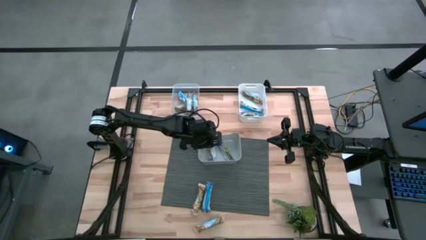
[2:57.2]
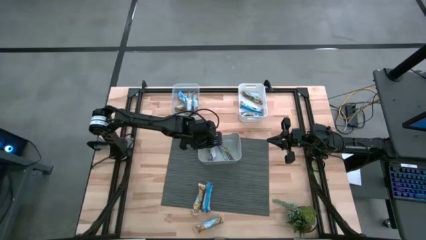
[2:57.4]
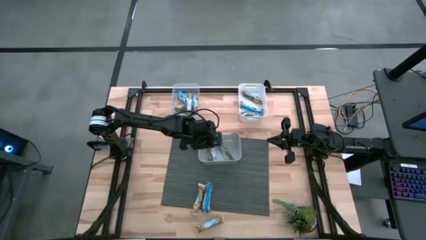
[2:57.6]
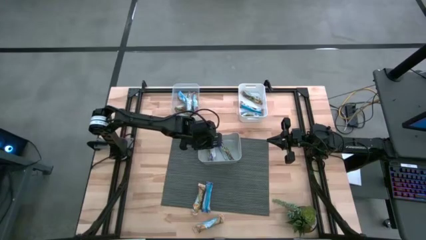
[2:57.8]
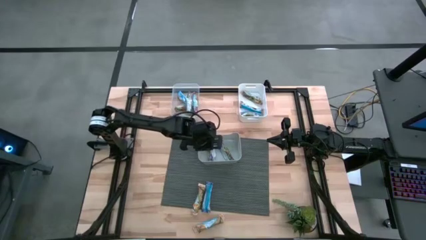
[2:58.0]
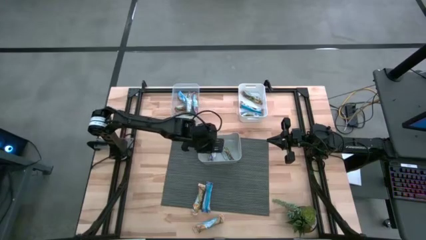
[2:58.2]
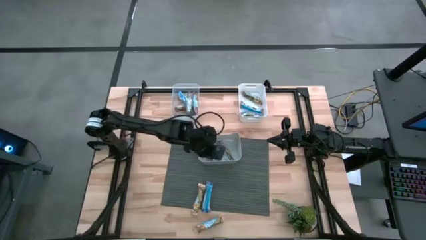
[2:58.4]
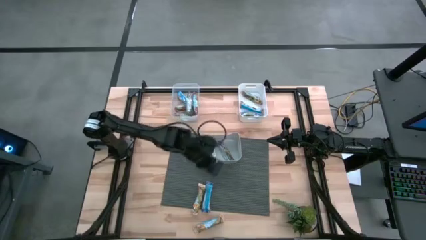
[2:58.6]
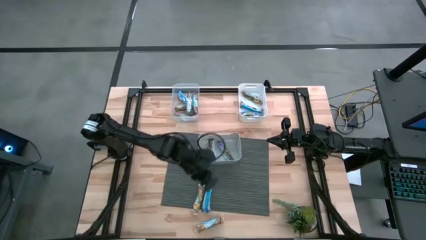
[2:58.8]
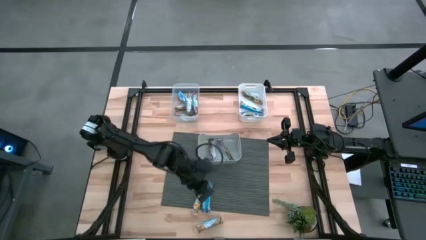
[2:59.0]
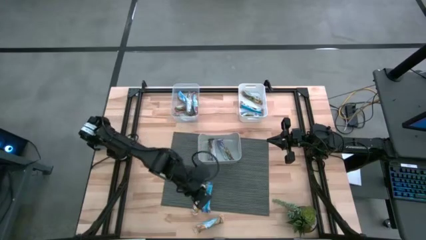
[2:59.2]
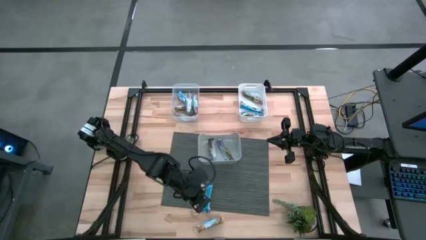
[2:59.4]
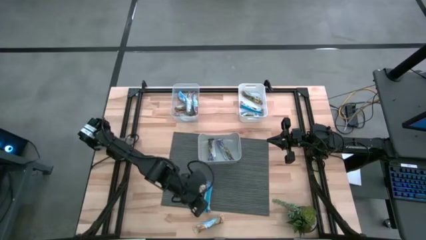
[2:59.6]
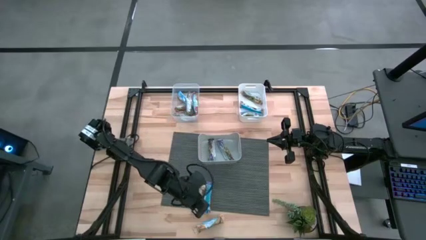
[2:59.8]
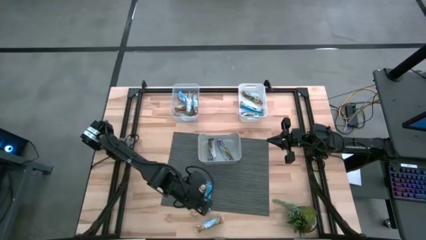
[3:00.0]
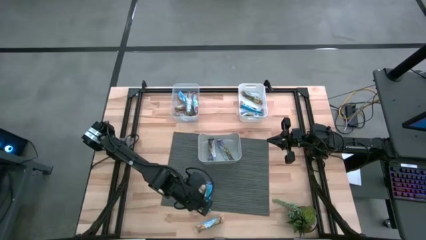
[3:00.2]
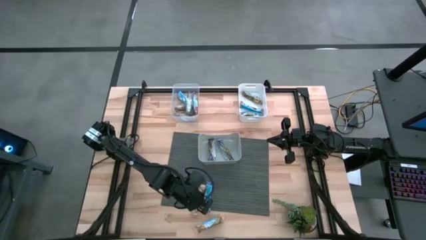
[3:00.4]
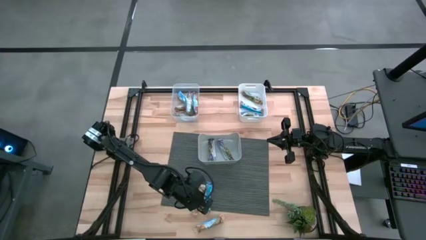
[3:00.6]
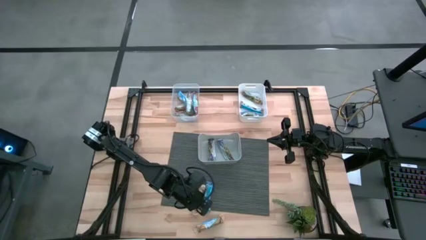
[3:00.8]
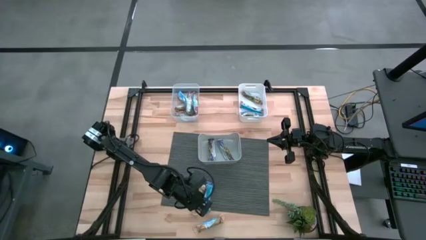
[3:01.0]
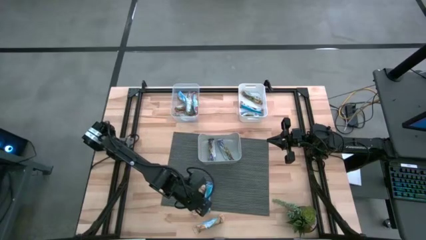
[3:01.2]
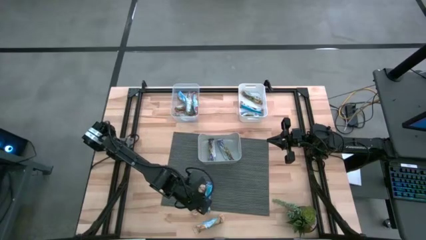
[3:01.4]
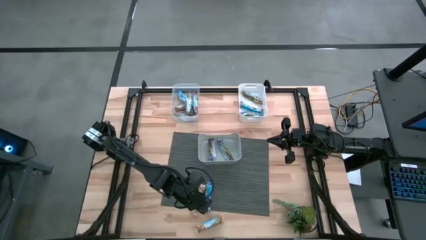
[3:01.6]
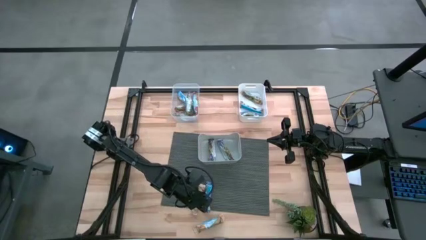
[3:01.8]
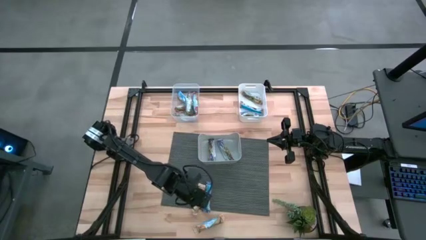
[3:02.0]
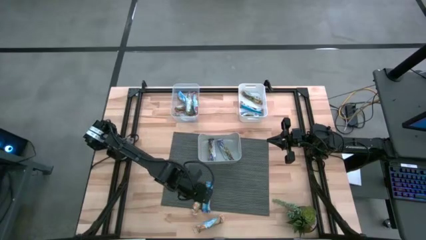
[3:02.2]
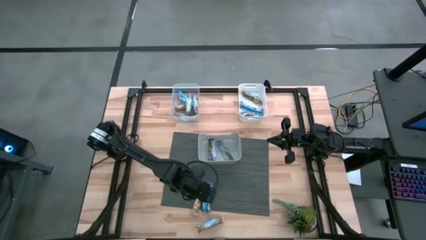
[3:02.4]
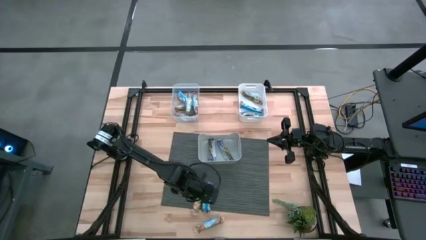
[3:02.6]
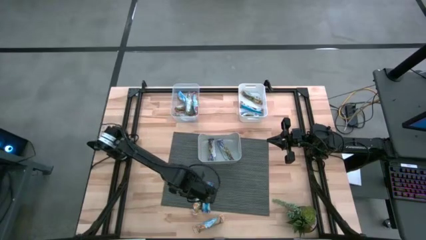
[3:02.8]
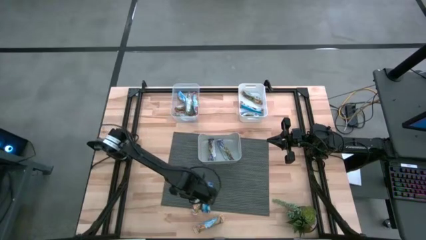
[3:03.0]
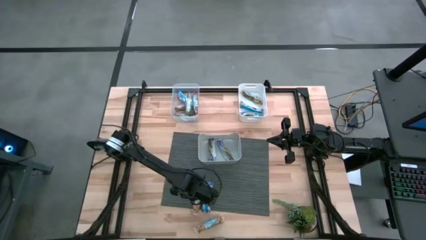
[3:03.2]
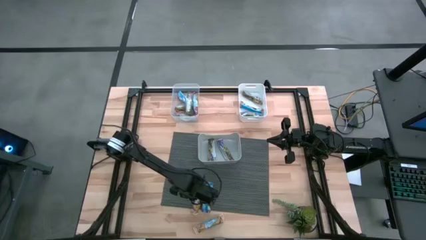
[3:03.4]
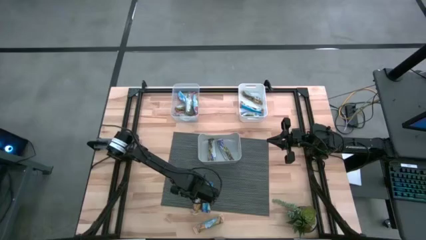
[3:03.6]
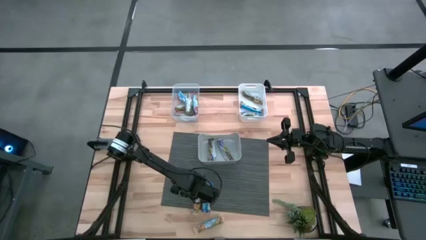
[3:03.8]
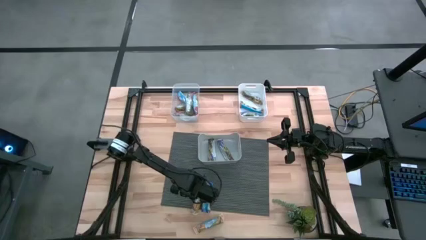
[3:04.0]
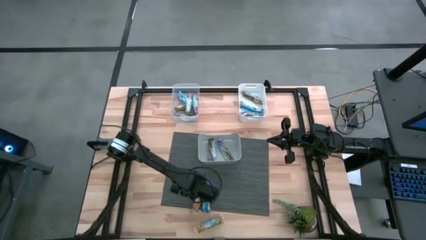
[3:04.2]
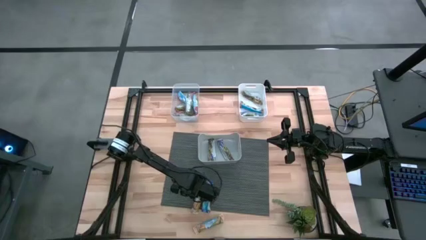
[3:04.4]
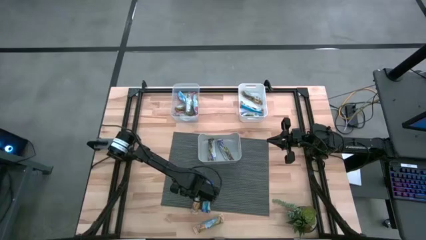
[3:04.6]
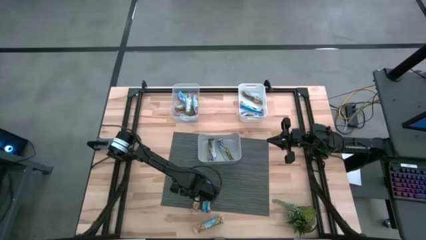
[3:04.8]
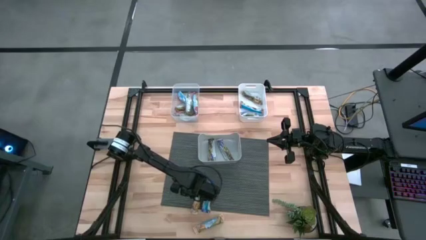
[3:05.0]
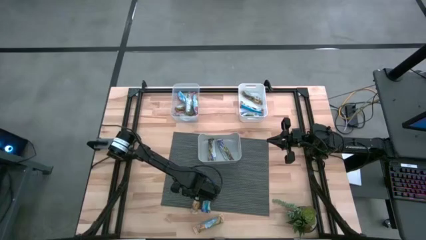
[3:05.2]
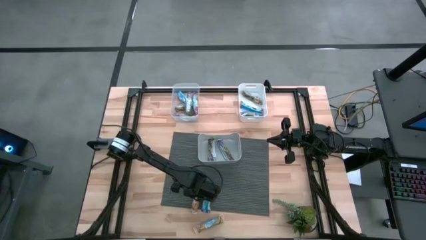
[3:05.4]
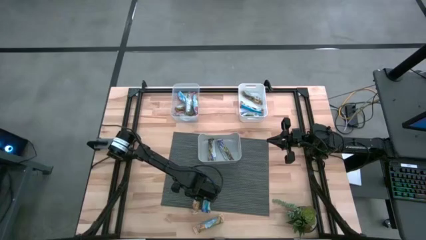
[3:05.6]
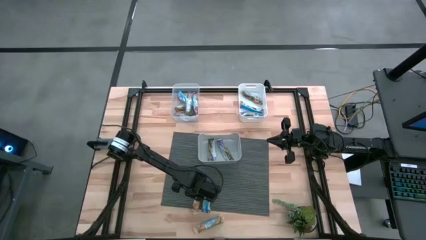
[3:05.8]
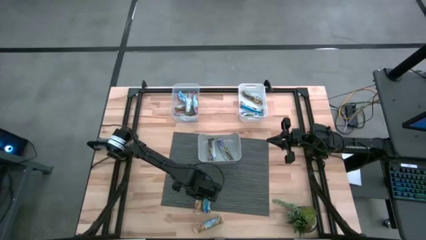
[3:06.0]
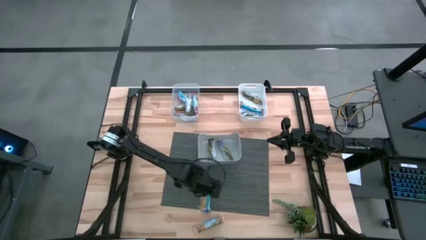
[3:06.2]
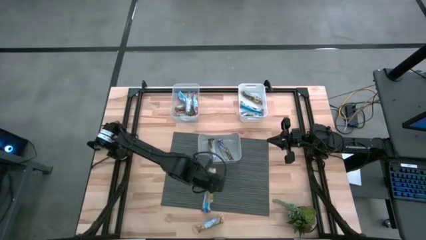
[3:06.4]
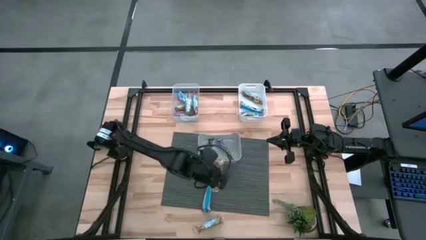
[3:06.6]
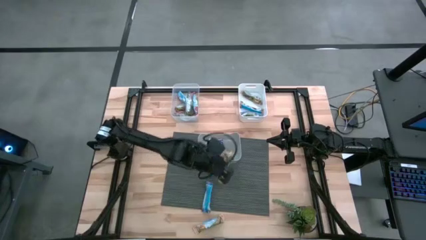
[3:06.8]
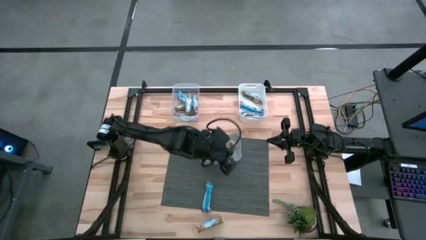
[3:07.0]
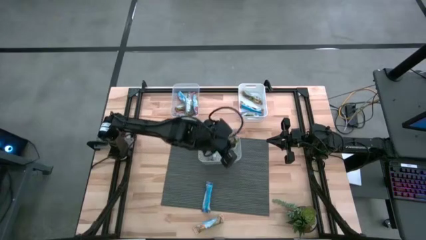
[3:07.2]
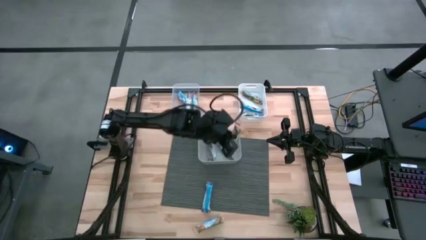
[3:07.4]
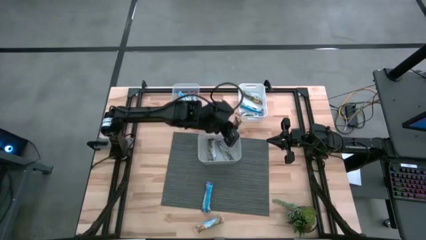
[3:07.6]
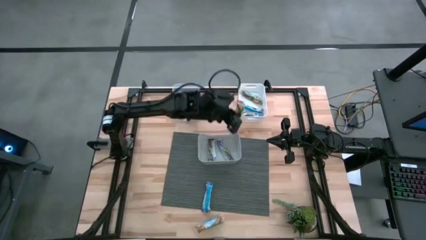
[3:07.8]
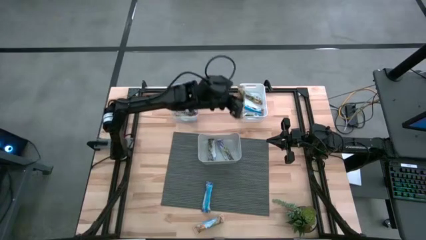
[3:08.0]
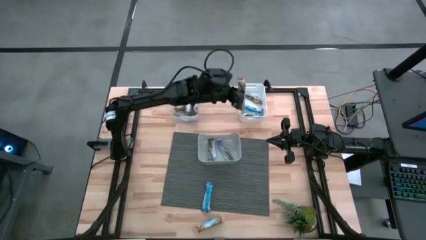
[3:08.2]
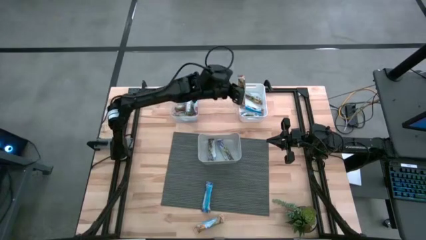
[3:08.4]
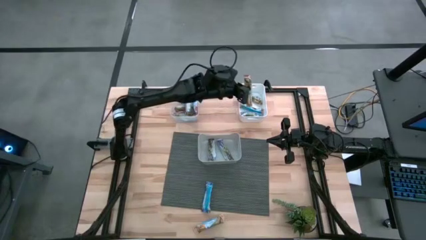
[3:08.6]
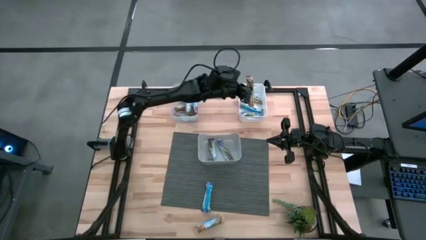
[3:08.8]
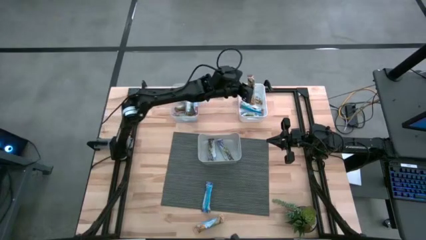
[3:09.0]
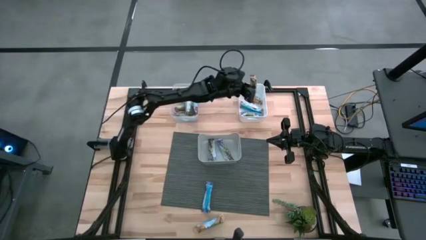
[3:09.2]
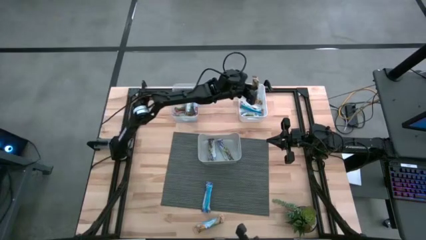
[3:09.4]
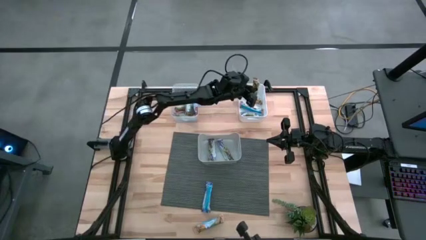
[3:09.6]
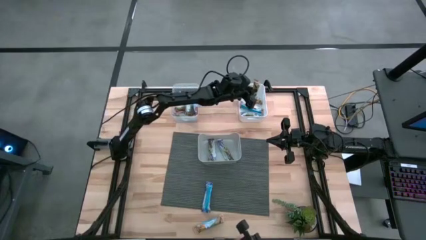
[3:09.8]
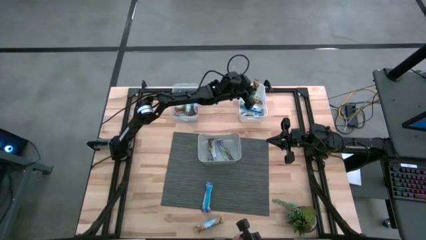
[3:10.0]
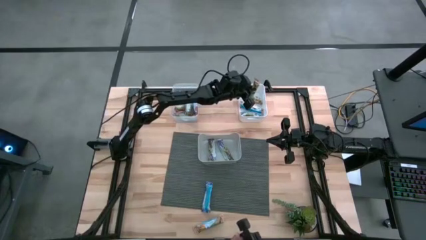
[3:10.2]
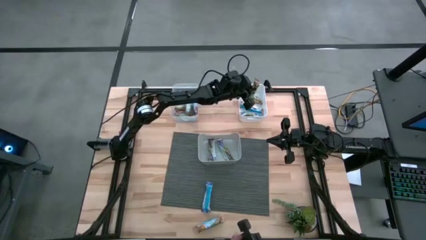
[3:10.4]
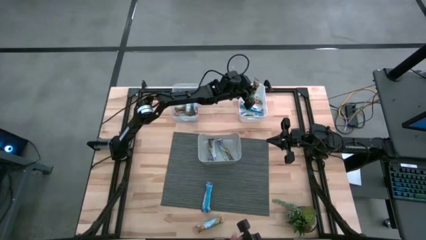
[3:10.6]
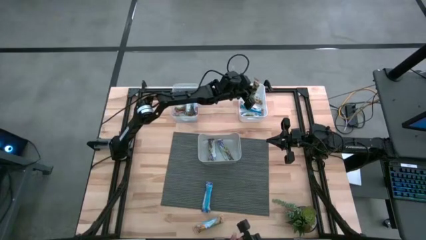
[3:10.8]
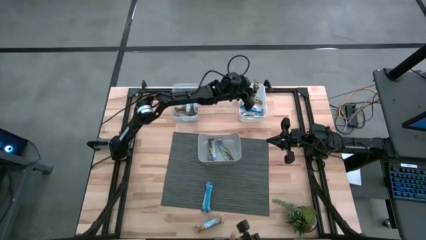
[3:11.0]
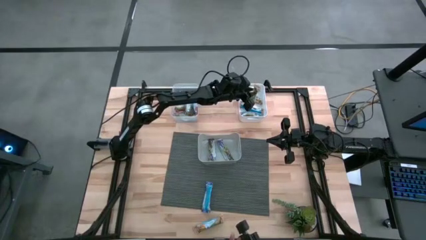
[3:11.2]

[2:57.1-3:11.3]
Task: Pick and place Granola Bars by type
Put the yellow granola bar into the white bin

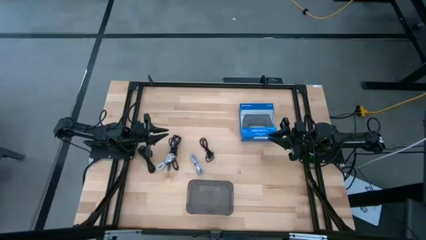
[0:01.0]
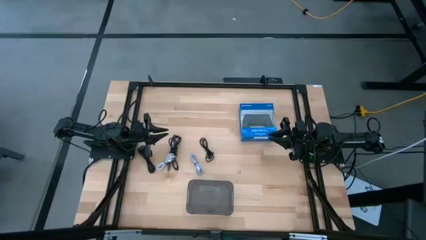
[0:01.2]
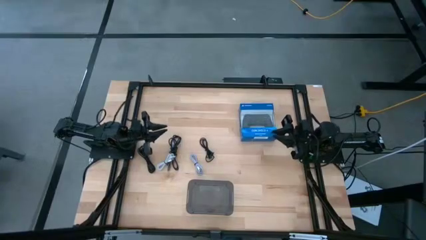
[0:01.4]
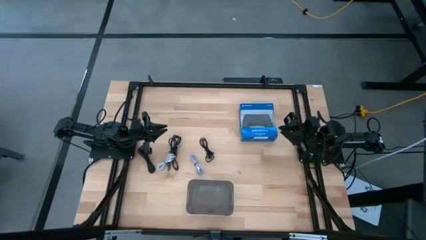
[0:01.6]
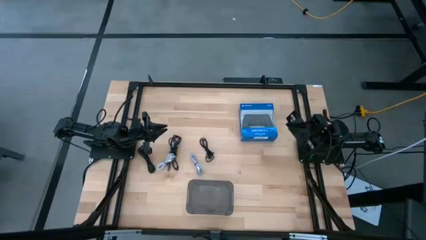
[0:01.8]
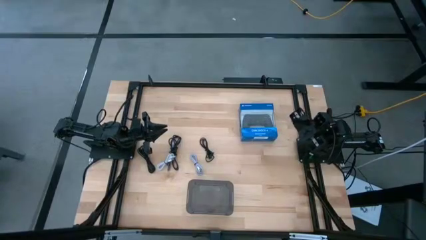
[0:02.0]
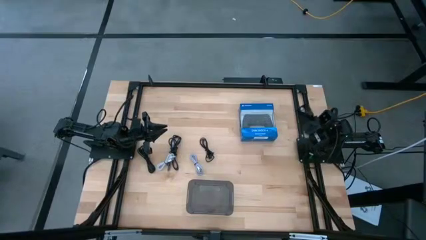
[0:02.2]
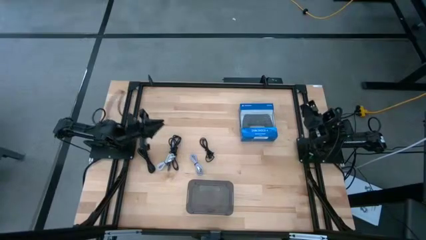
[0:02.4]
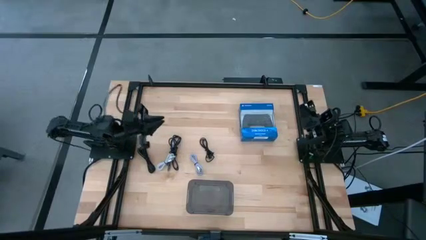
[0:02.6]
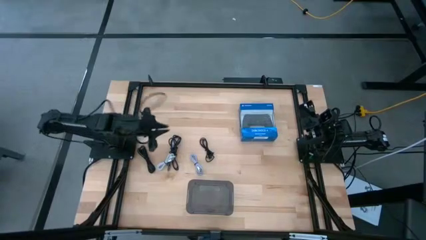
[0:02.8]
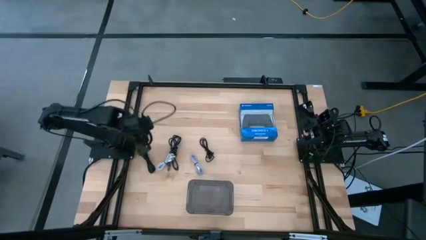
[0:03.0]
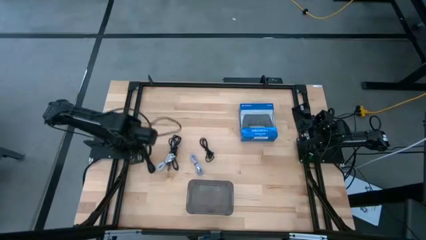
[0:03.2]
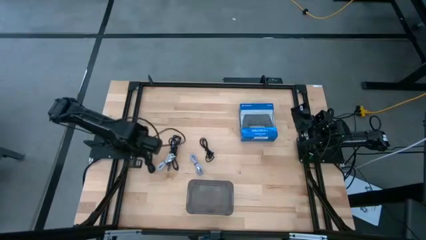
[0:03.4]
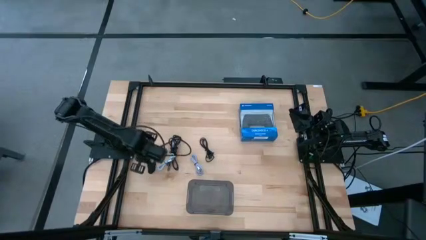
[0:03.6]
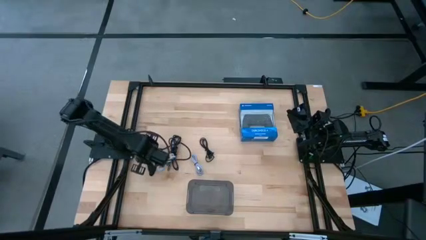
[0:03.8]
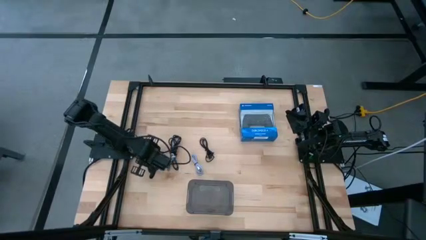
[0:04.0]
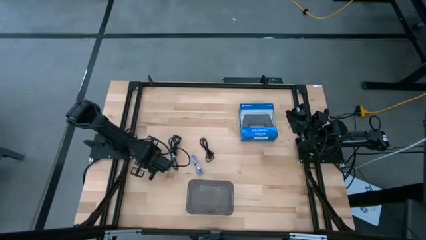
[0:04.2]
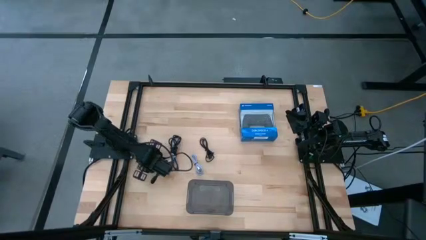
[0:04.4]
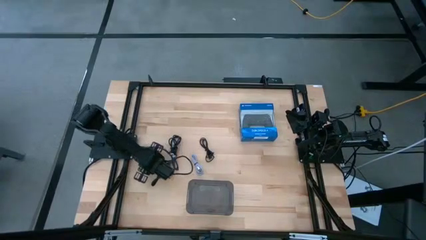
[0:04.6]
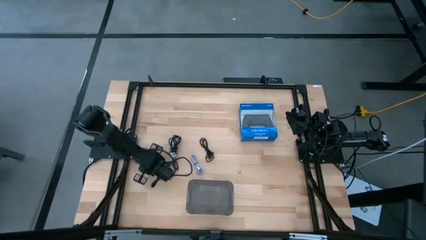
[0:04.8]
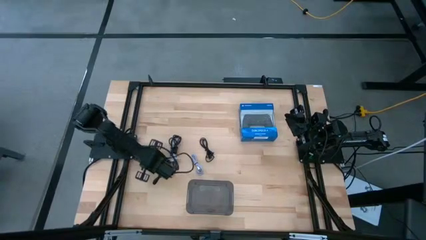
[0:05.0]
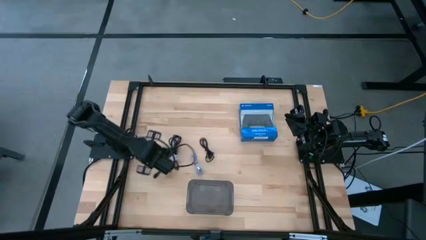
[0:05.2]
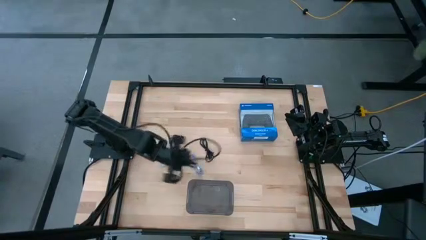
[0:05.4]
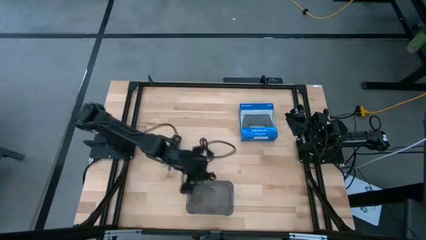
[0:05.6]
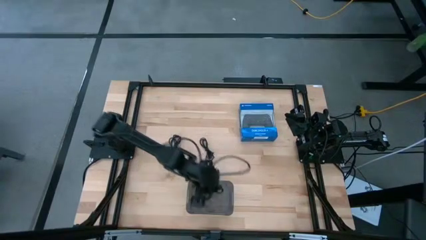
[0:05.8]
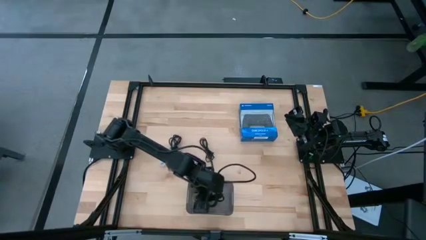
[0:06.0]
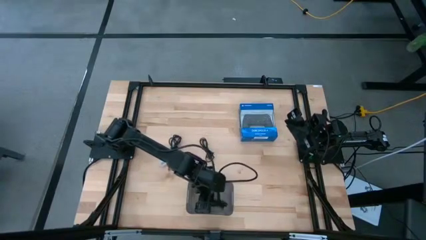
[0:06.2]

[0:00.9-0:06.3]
Task: Pick and place USB-C Cables
Put the left black charger cable into the black bin
